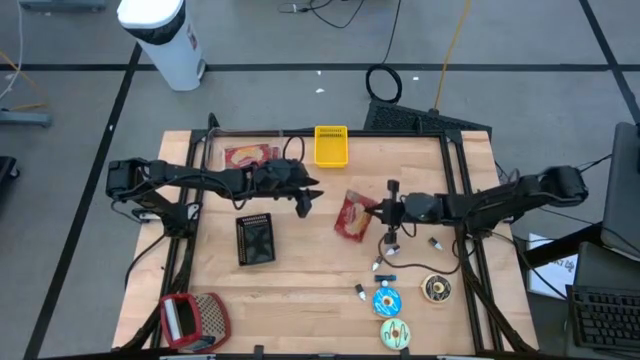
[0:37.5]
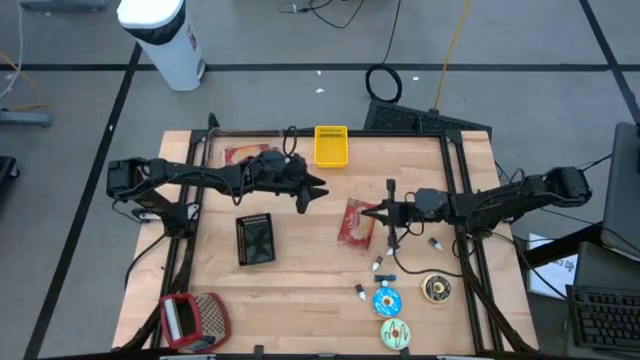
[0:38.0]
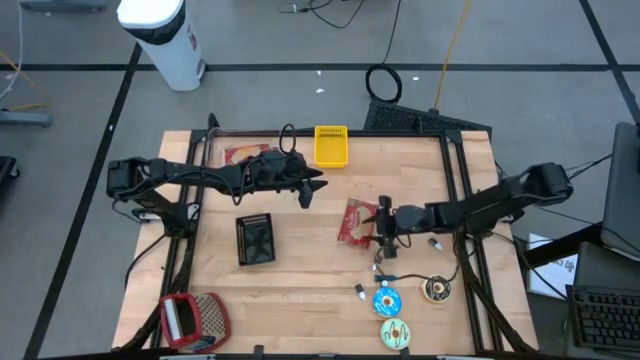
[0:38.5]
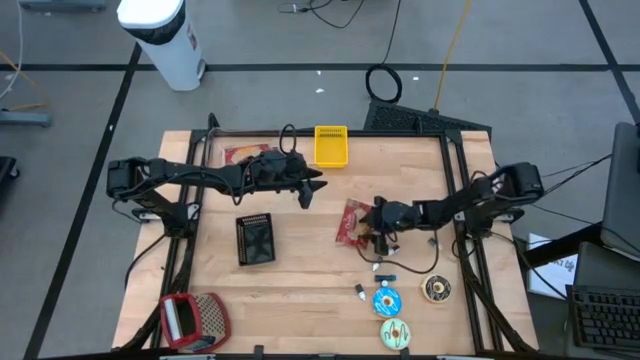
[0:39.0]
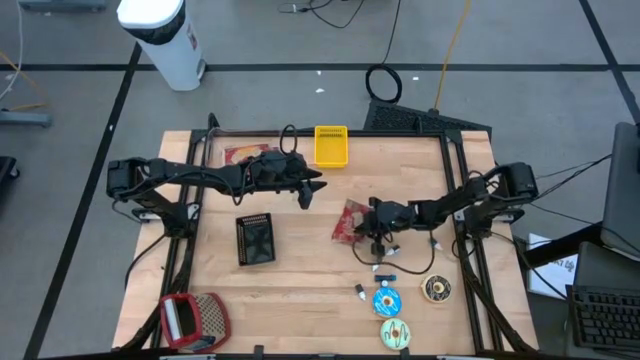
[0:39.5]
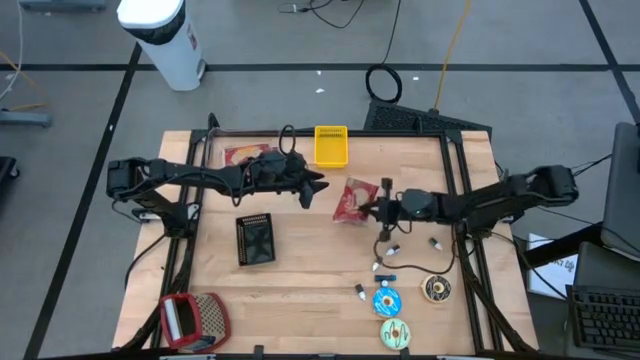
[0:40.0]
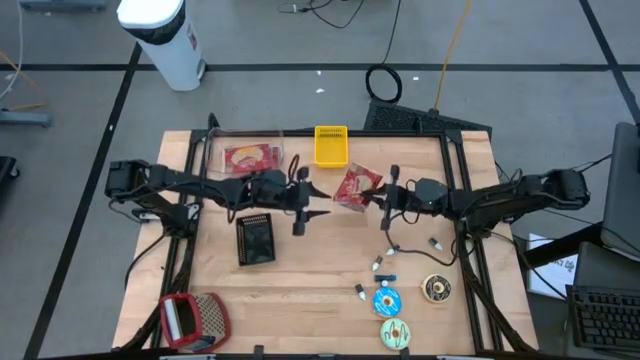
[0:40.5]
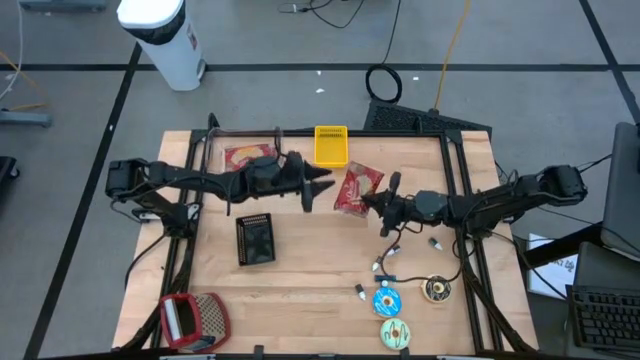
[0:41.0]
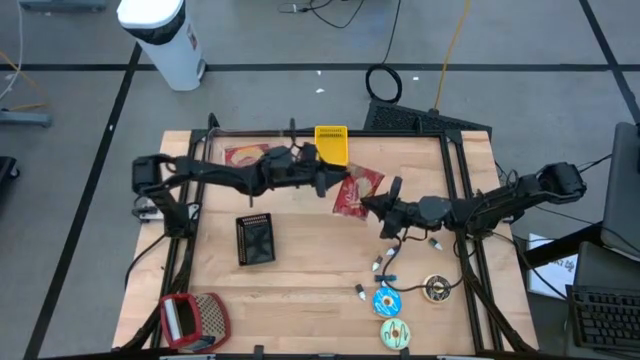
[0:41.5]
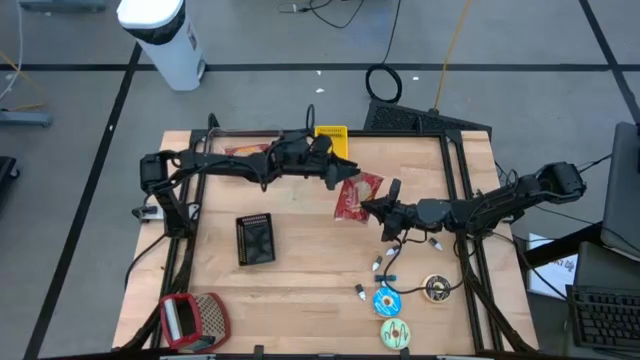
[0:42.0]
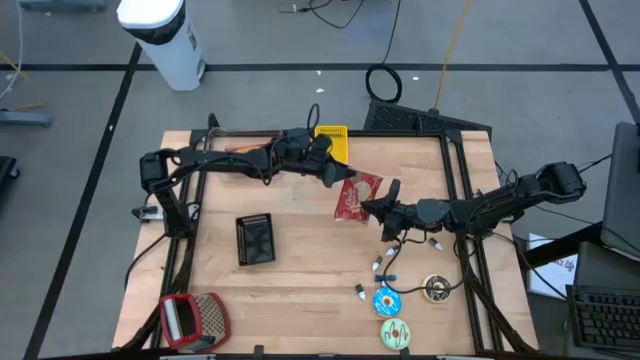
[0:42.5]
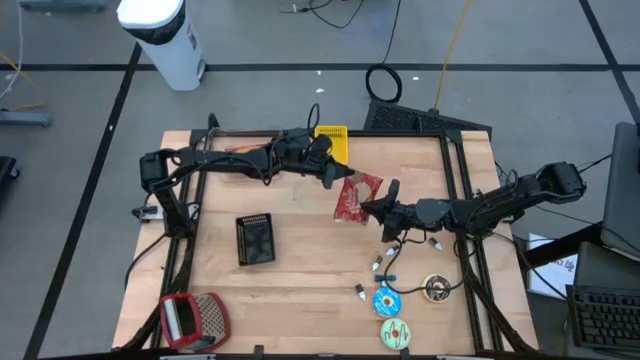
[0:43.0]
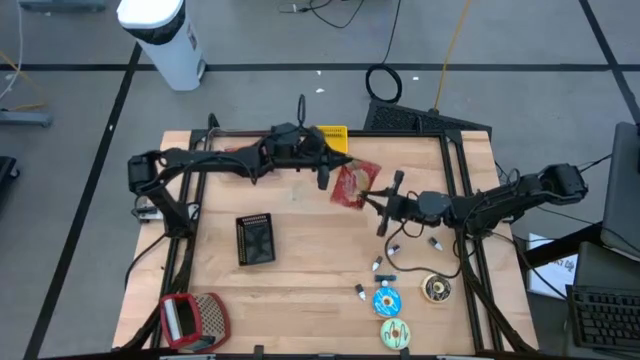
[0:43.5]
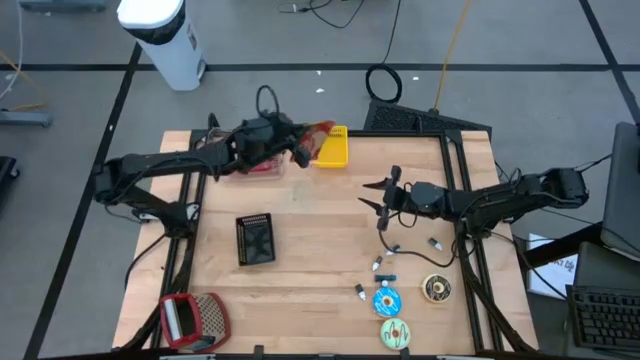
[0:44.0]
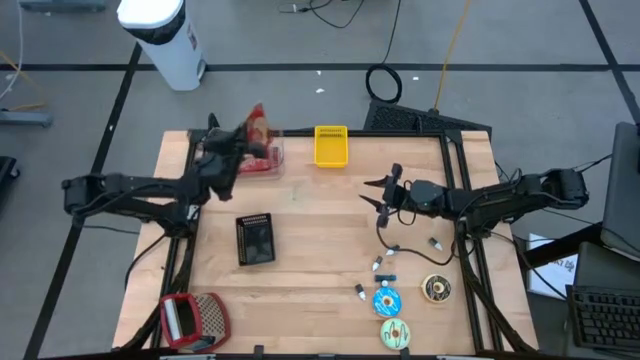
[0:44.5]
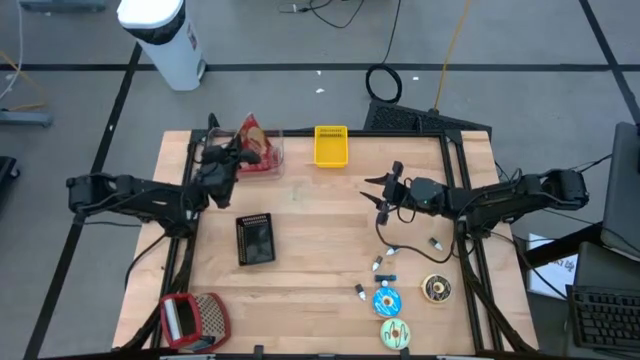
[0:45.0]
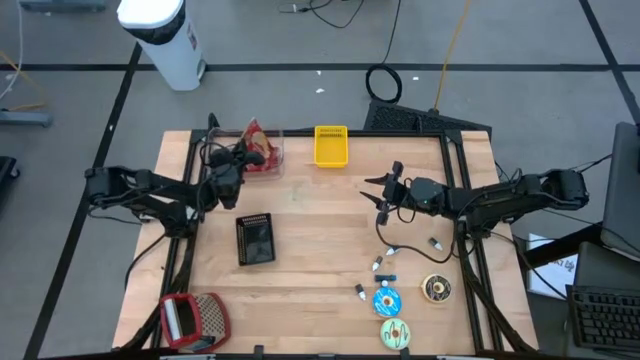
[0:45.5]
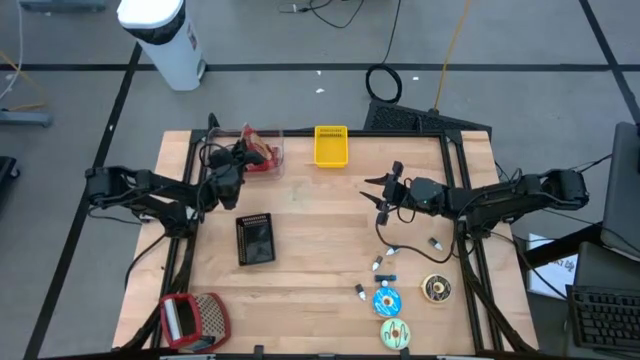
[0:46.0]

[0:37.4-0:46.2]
Task: Pick & Place Food Item
Put the popcorn pack into the transparent bin

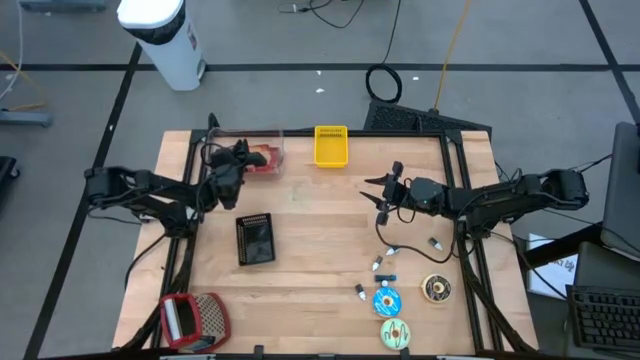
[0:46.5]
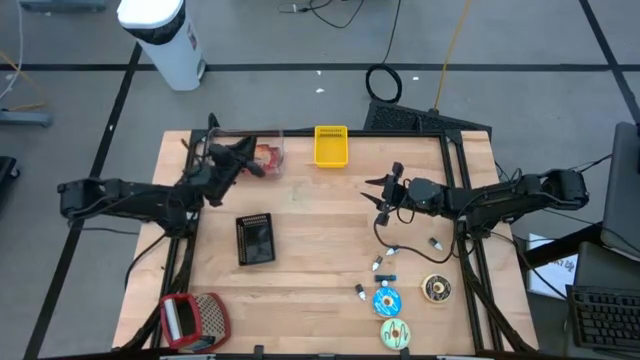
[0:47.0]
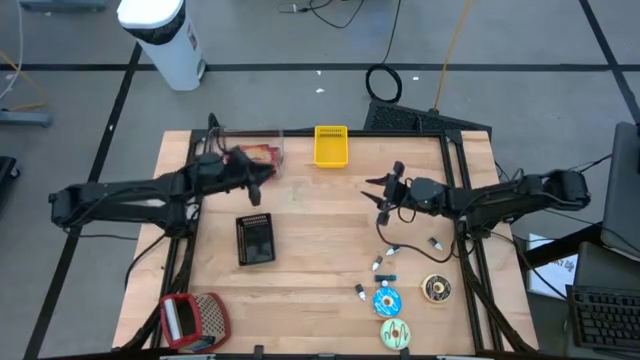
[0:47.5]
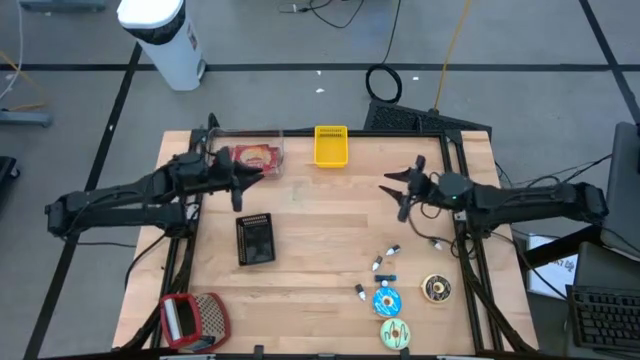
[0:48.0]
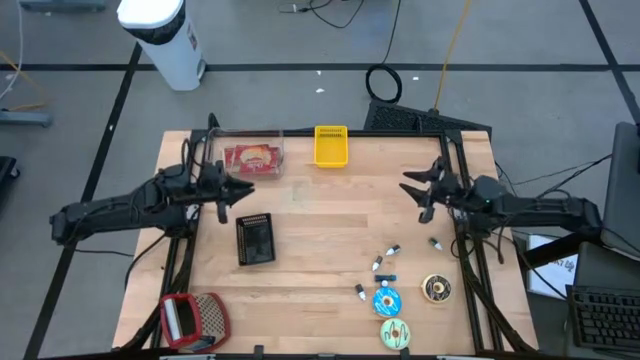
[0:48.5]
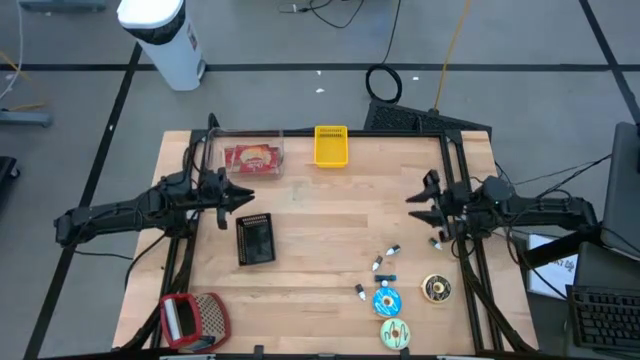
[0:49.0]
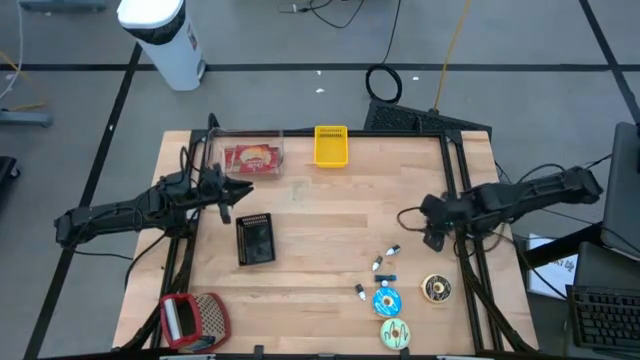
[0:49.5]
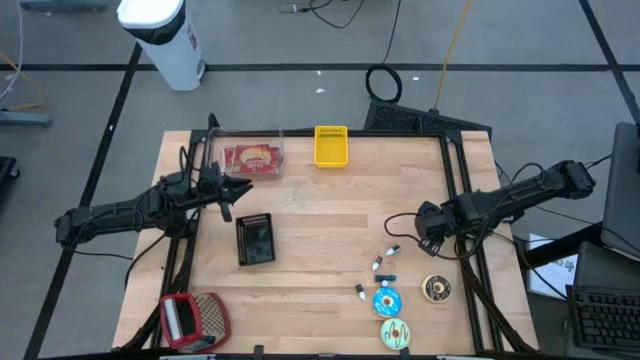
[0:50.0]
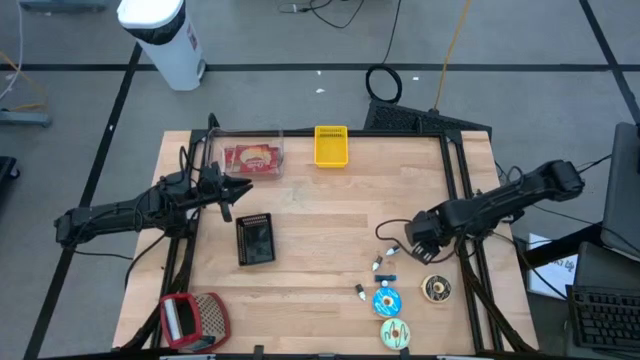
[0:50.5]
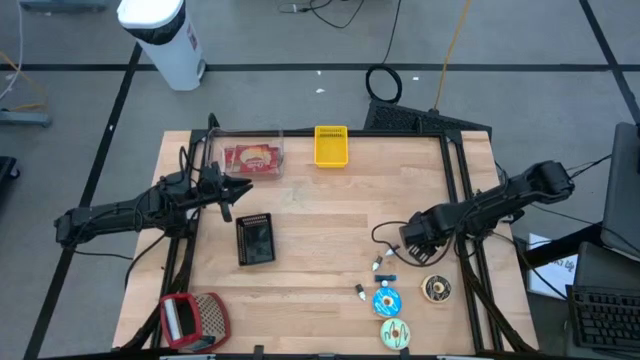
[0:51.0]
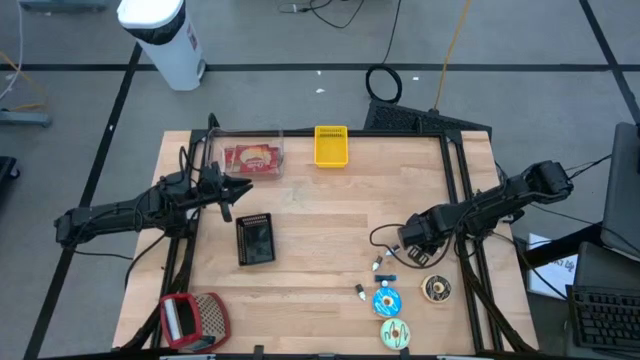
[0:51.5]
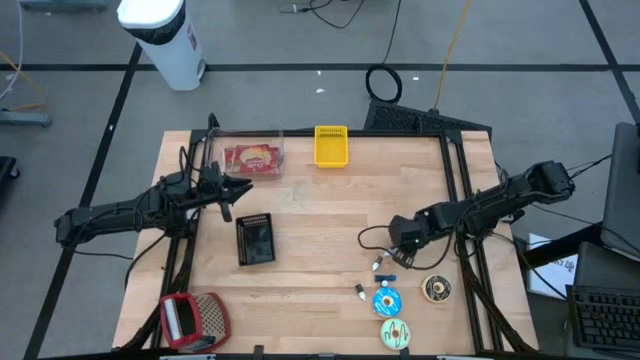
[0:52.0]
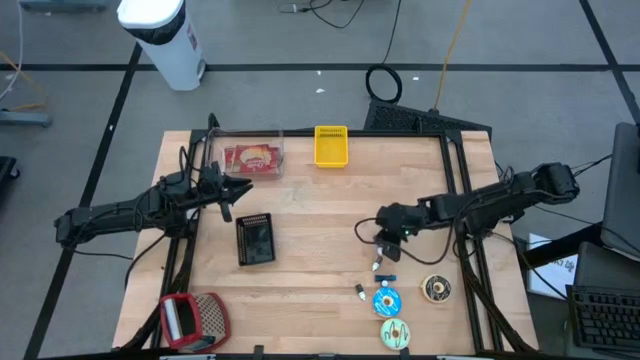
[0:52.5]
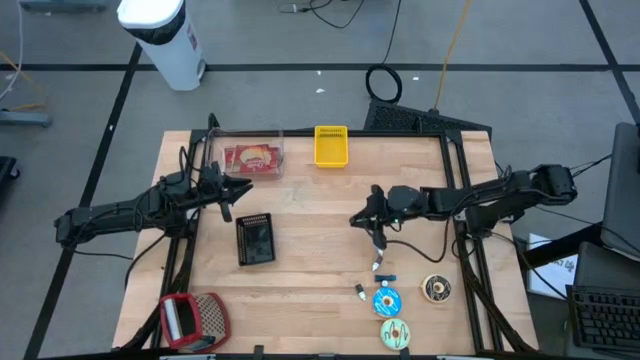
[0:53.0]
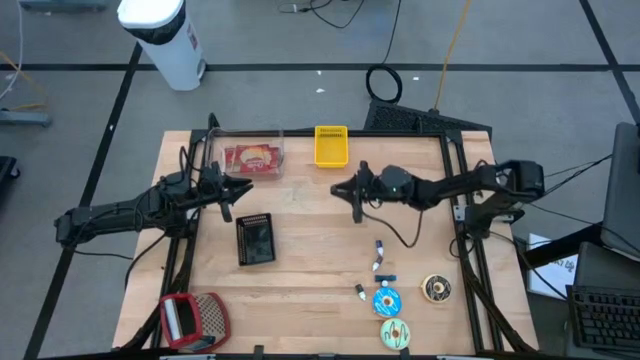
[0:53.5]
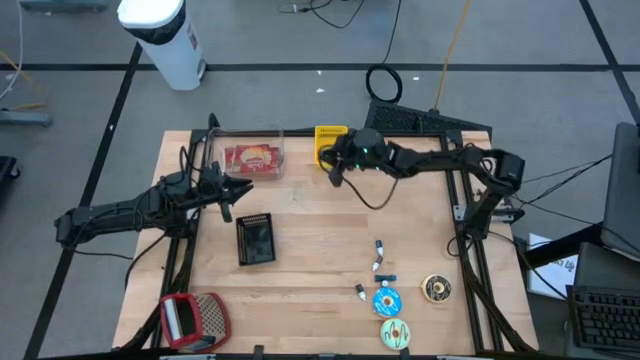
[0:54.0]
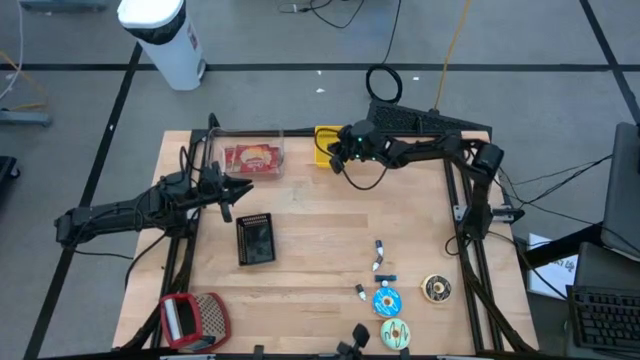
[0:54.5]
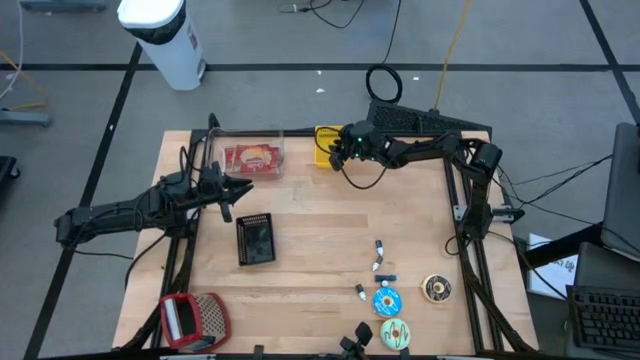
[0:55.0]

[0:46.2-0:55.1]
Put the green food coloring bottle into the yellow bin

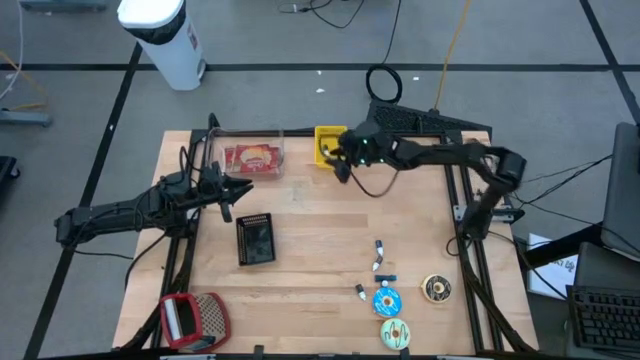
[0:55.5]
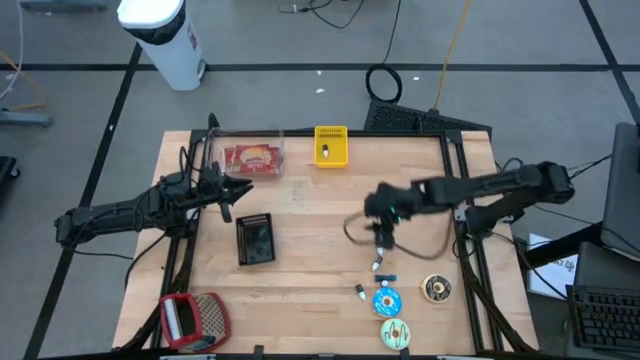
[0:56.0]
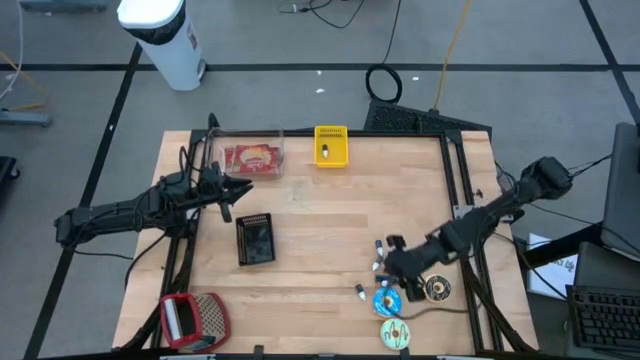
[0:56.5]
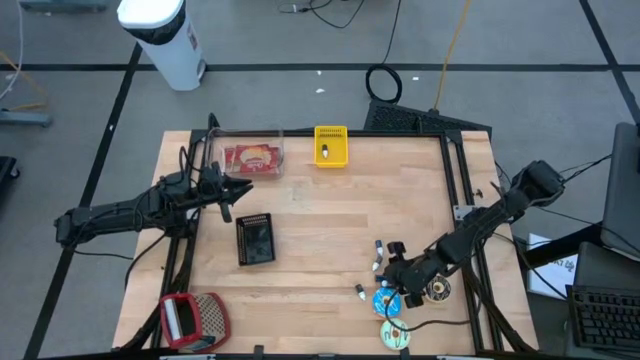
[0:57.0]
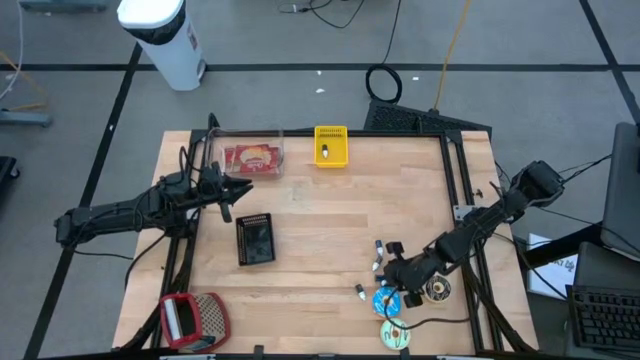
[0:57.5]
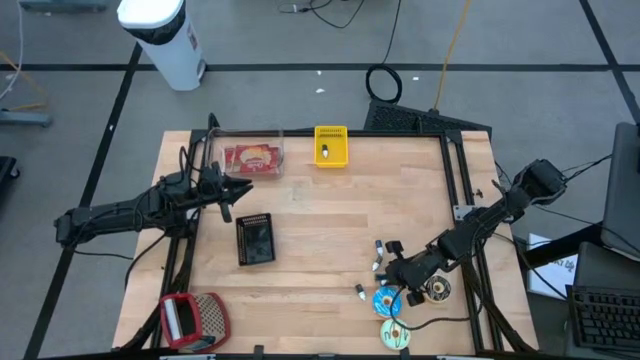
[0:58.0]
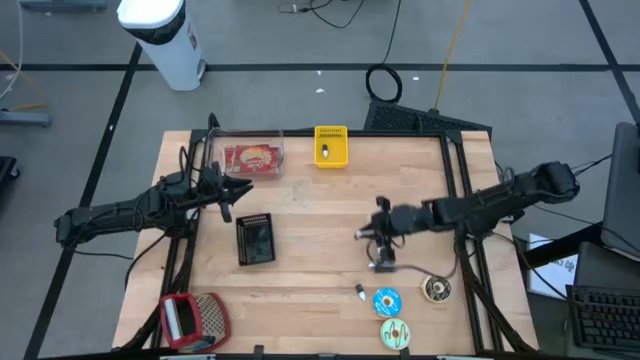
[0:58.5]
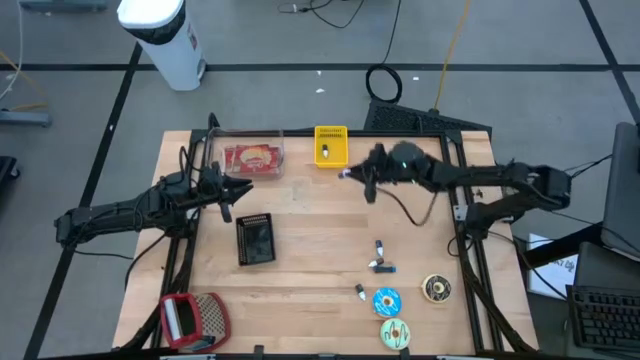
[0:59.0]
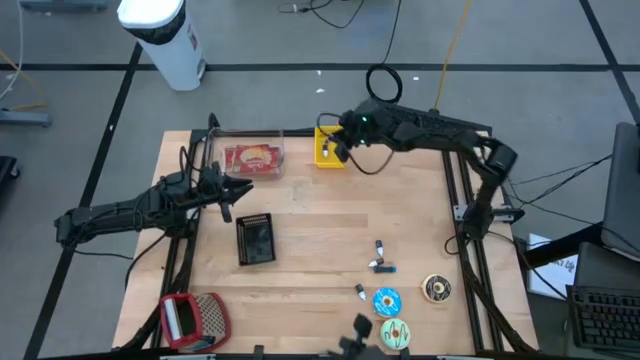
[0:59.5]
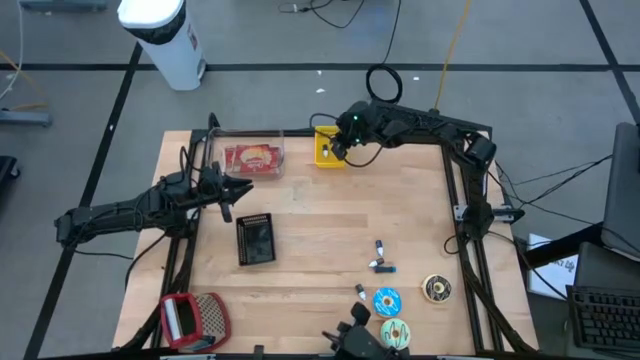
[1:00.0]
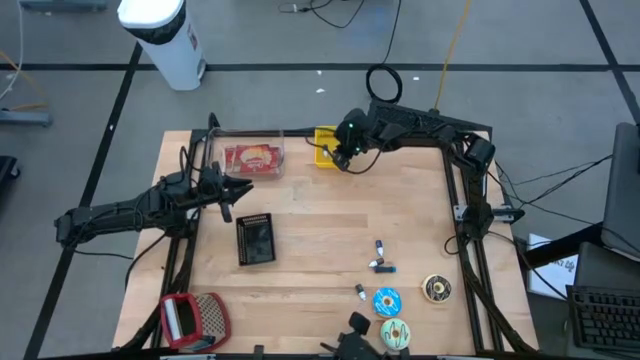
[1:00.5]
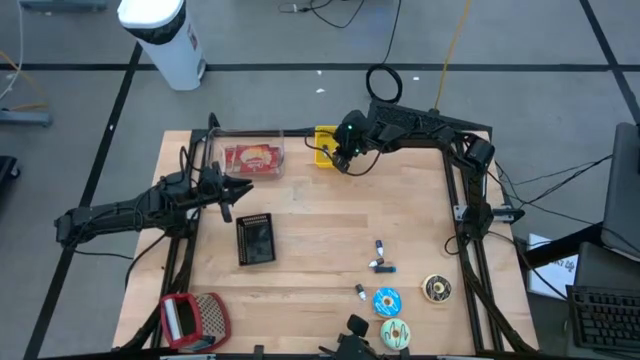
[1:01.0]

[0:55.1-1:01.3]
Put the violet food coloring bottle into the yellow bin
